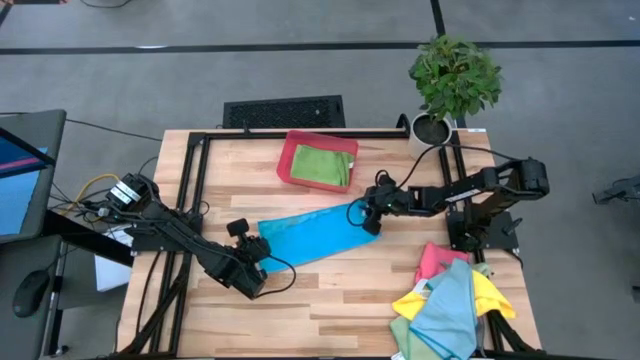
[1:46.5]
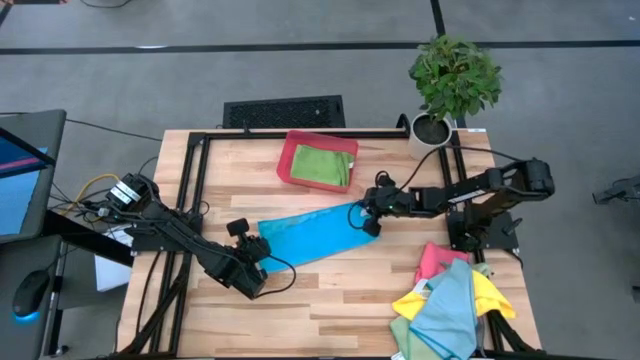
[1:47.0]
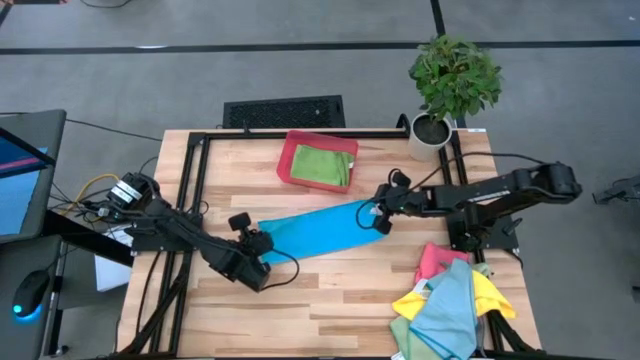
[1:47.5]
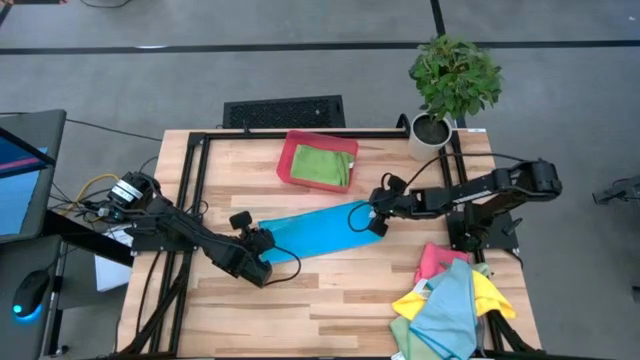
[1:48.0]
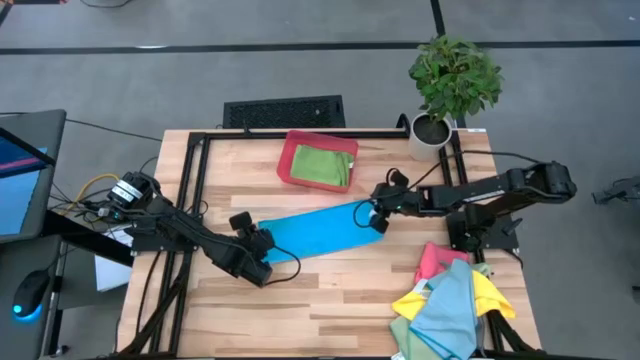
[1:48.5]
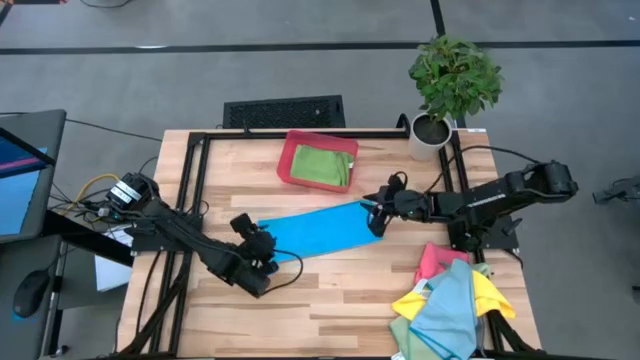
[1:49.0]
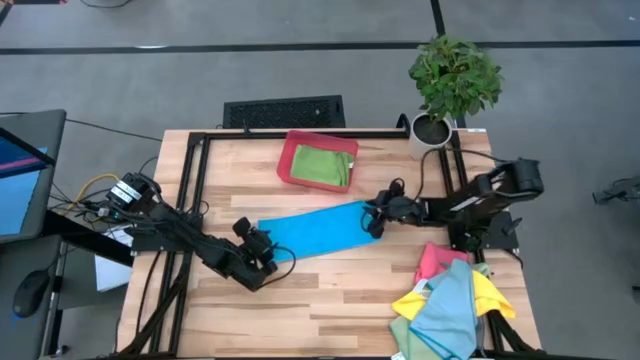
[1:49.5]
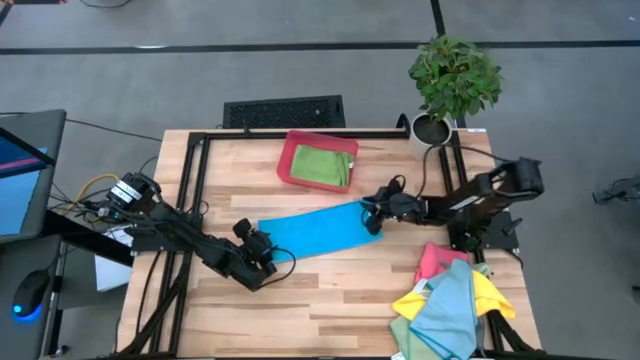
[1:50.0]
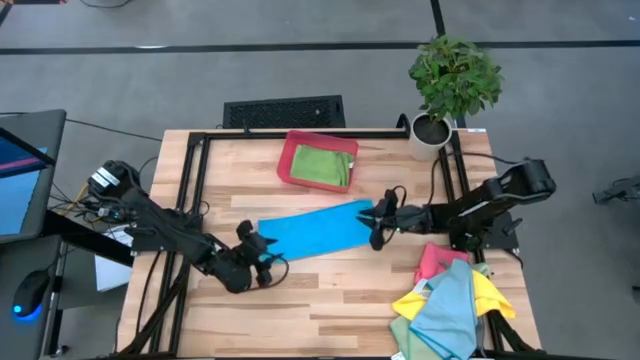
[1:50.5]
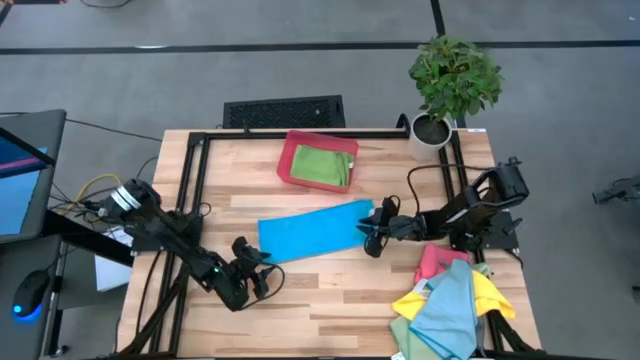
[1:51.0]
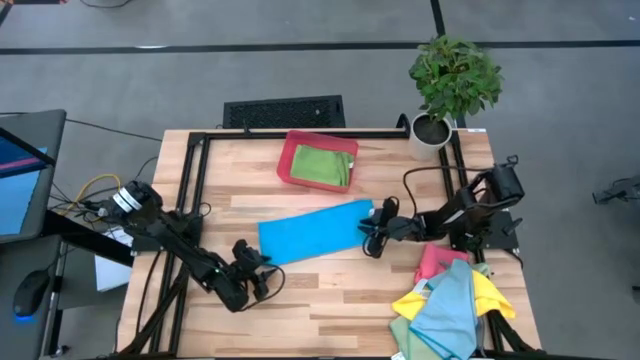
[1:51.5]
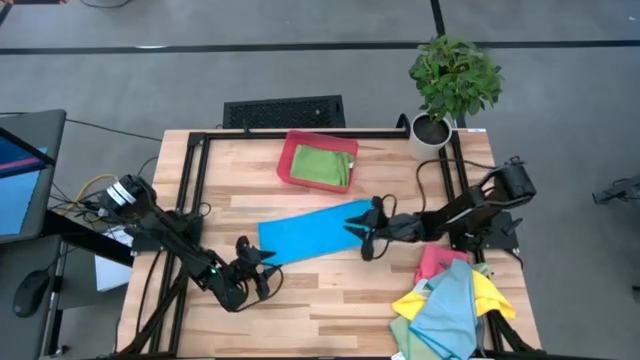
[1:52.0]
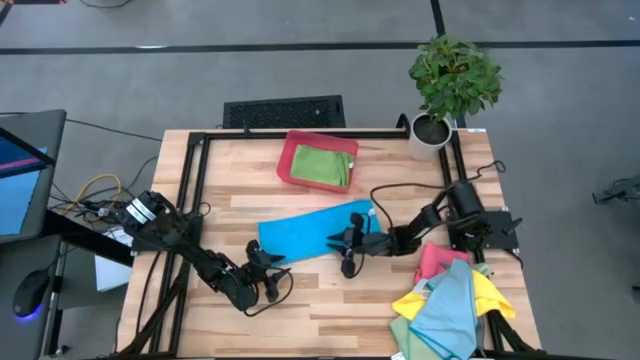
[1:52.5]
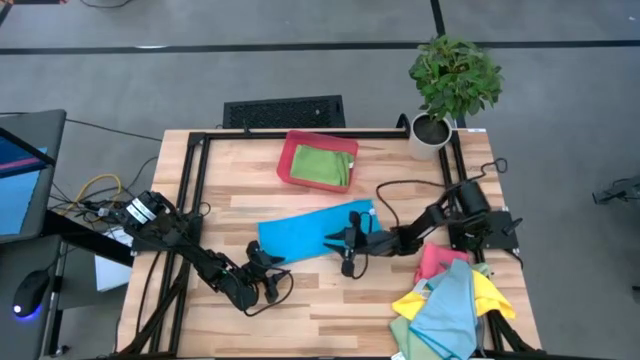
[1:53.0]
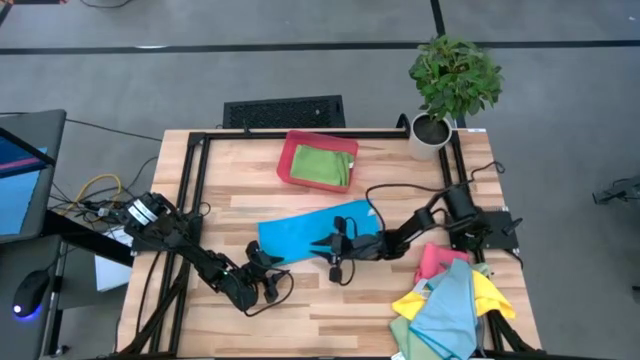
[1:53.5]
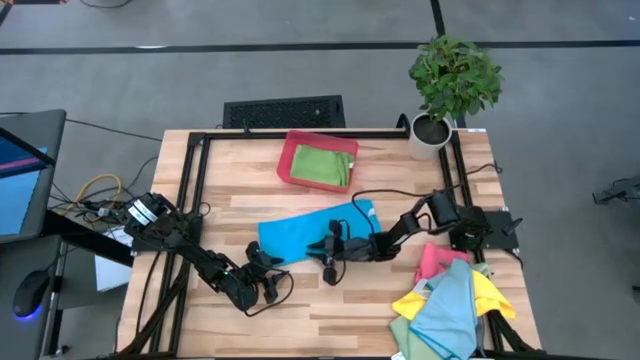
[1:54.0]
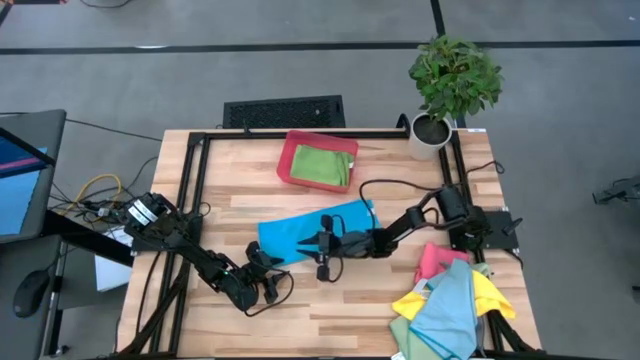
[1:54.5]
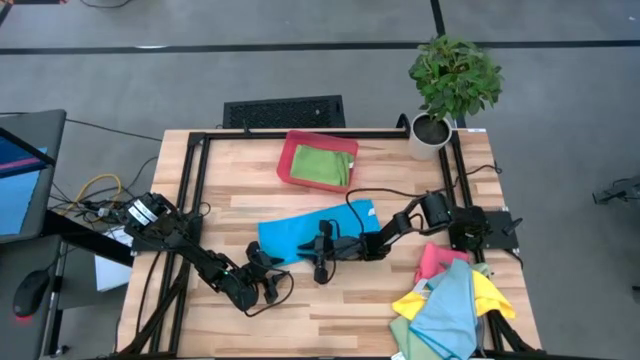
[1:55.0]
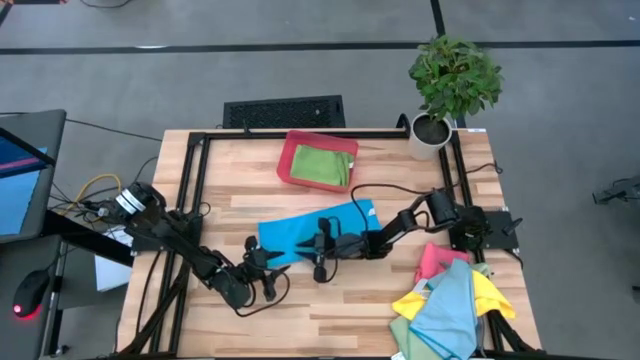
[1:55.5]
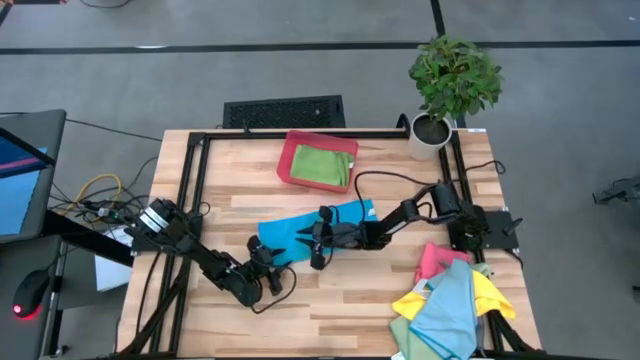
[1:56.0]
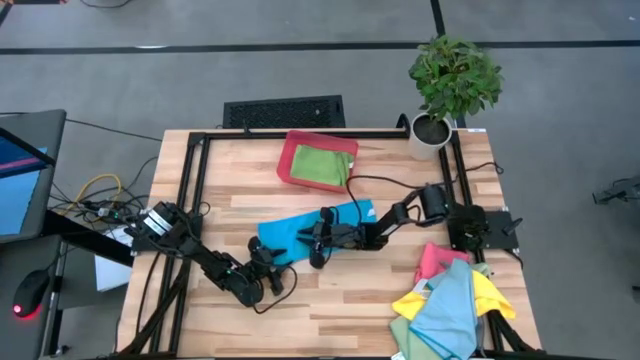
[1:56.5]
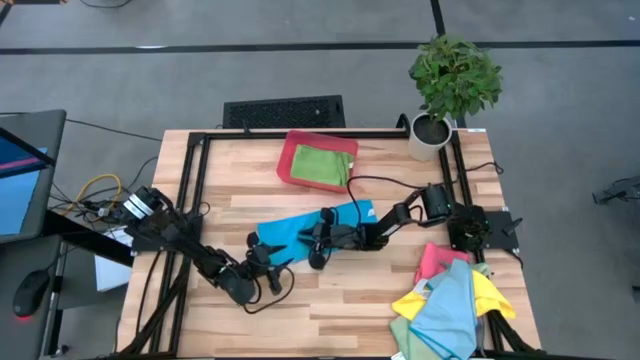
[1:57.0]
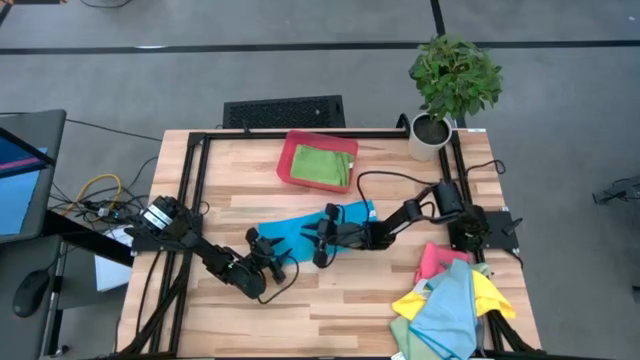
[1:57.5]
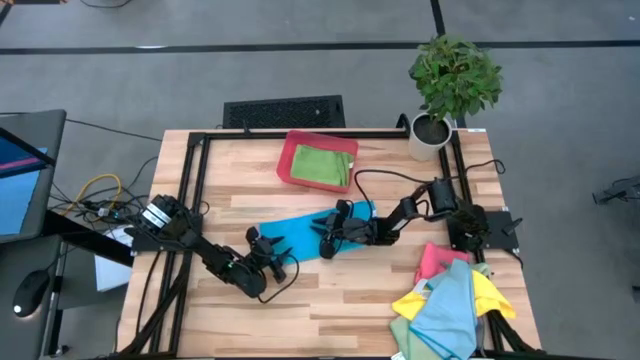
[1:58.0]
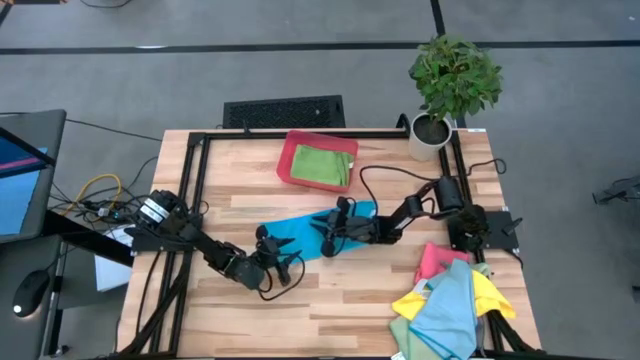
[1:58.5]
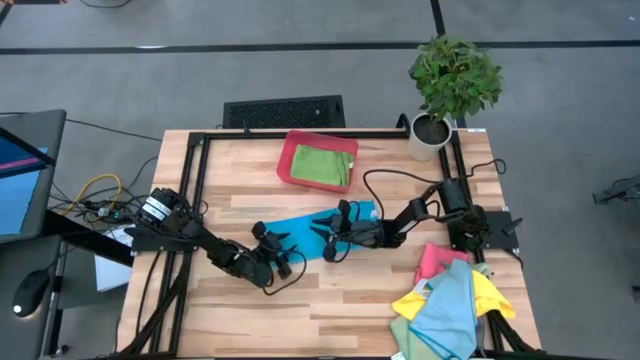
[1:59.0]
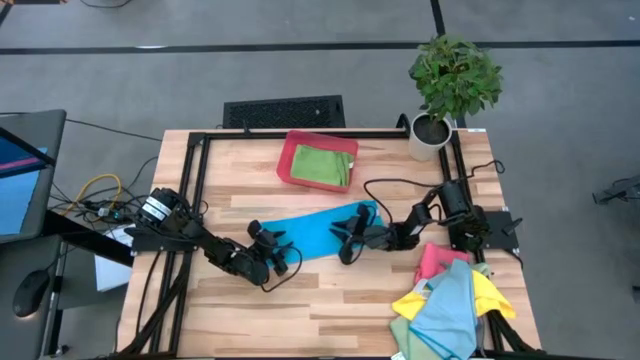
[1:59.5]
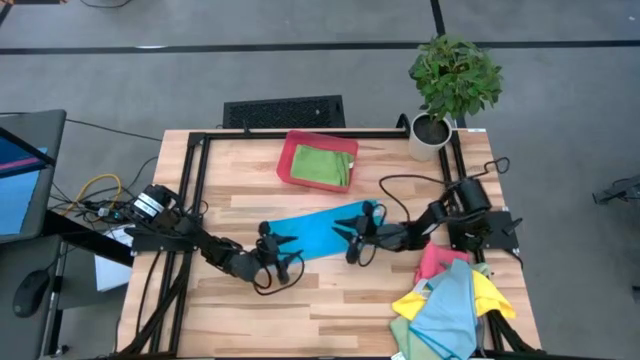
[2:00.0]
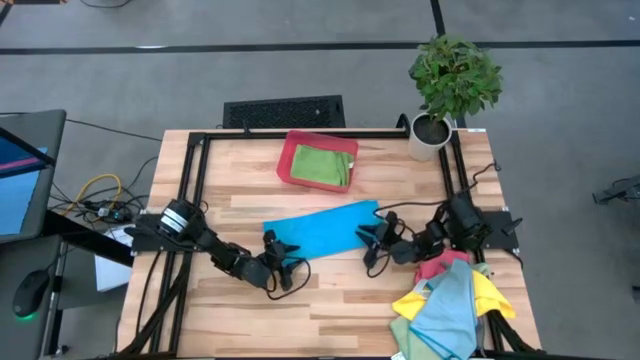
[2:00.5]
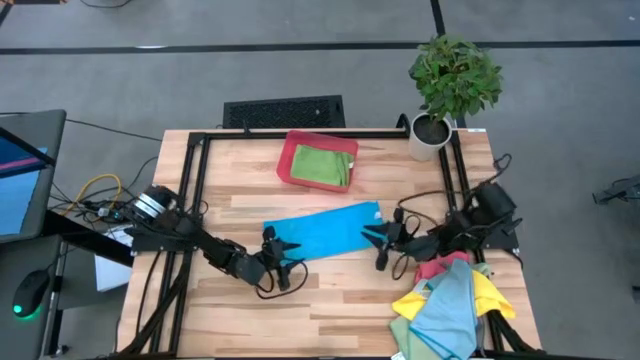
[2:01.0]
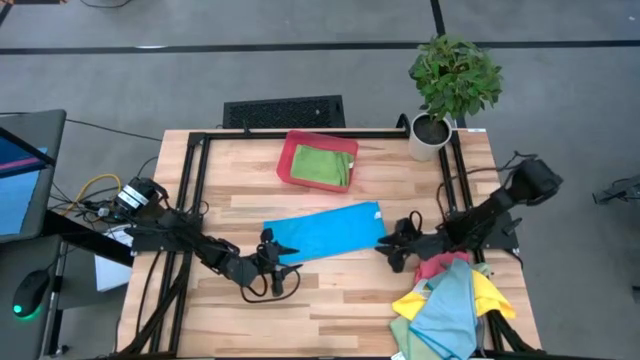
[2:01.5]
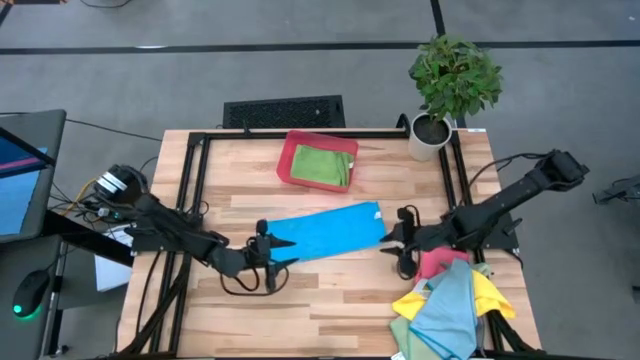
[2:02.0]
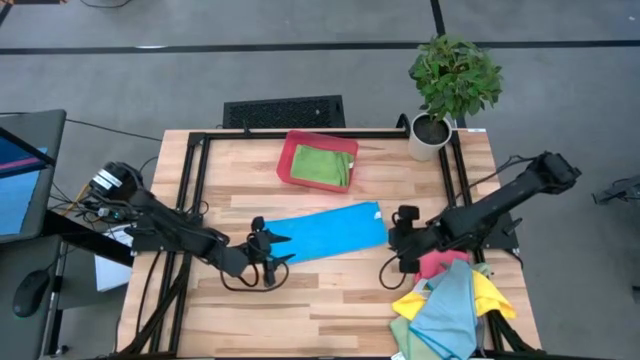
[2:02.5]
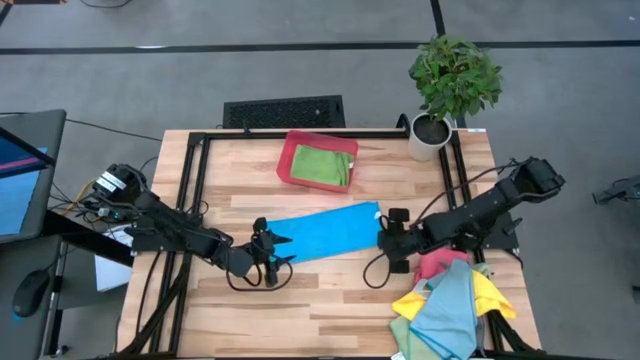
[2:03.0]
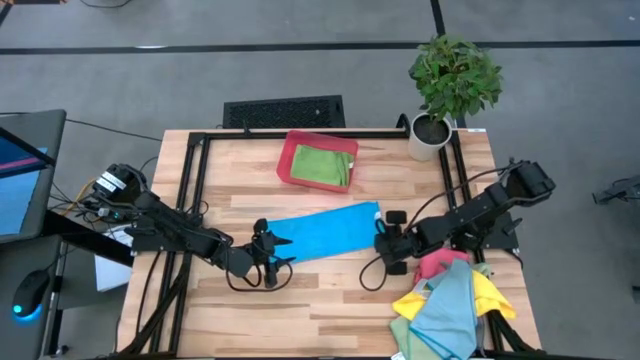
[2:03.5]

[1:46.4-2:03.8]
Task: Fold microfiber towels
Fold the blue microfiber cloth

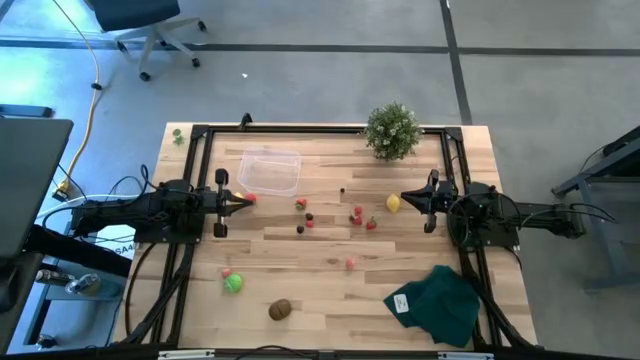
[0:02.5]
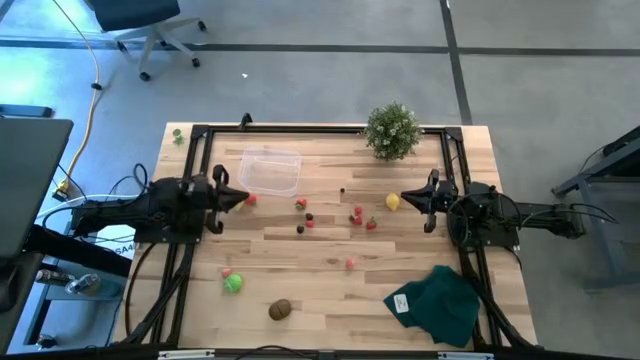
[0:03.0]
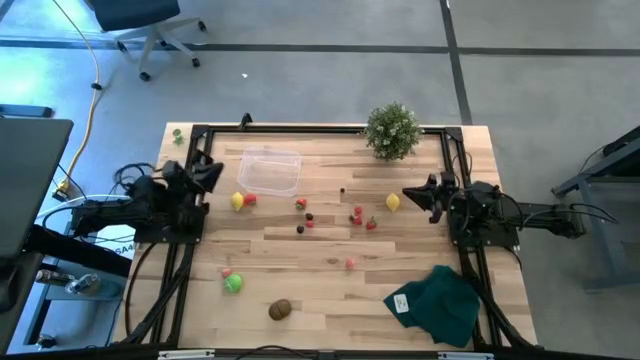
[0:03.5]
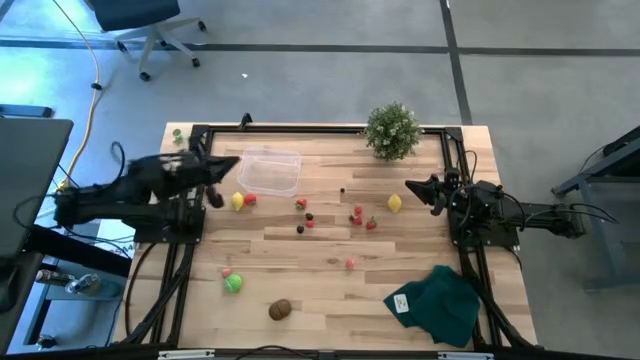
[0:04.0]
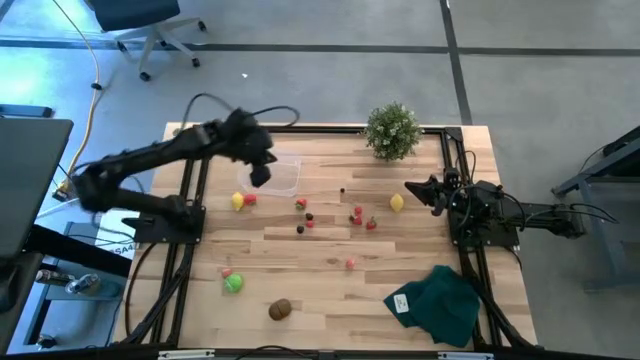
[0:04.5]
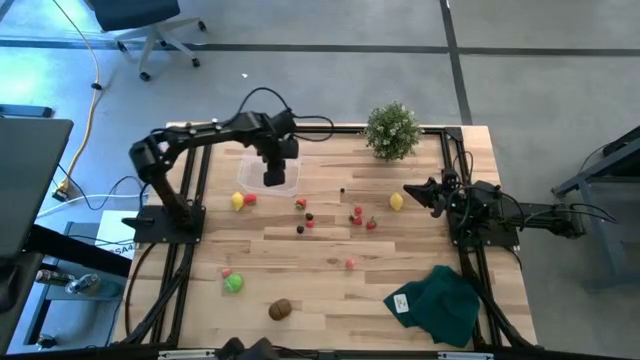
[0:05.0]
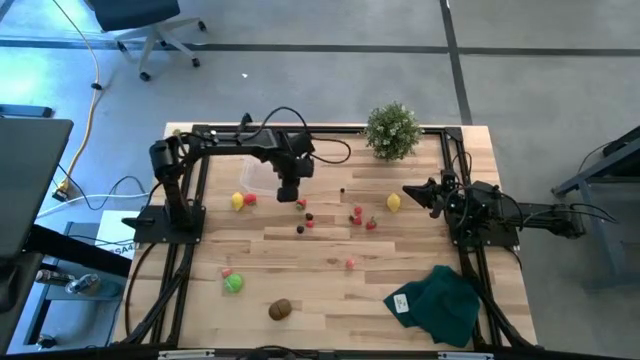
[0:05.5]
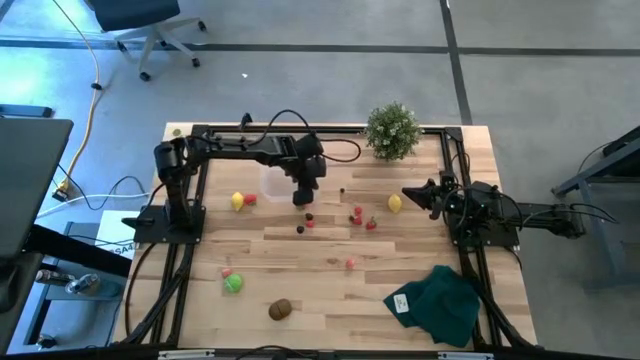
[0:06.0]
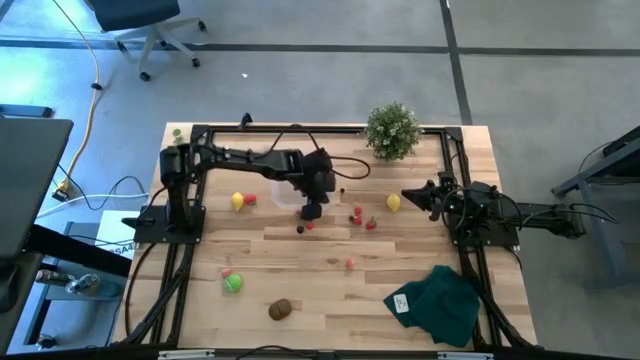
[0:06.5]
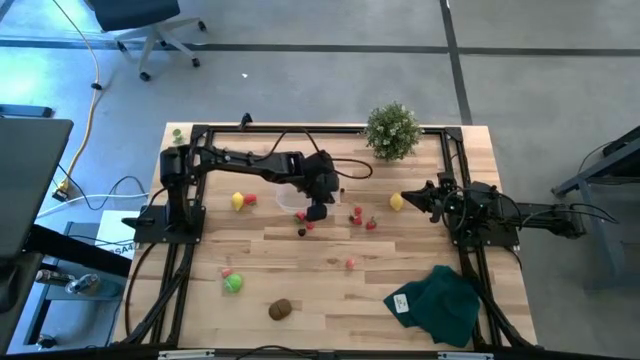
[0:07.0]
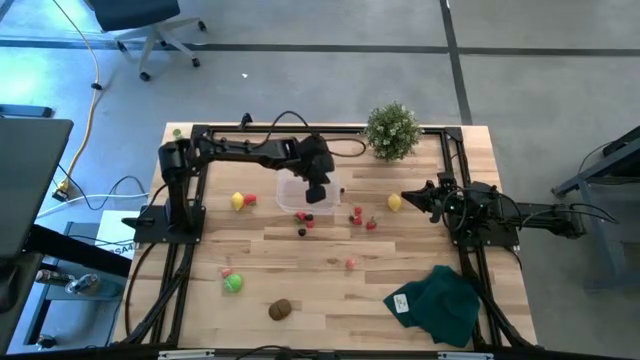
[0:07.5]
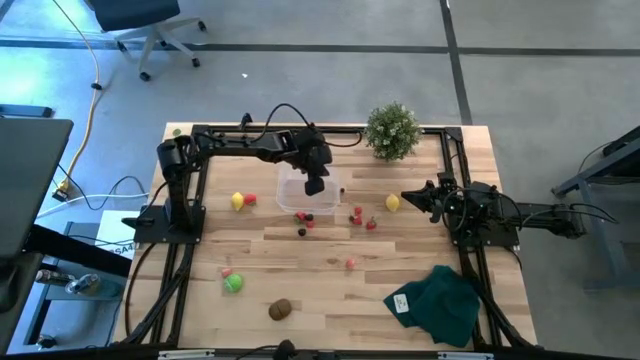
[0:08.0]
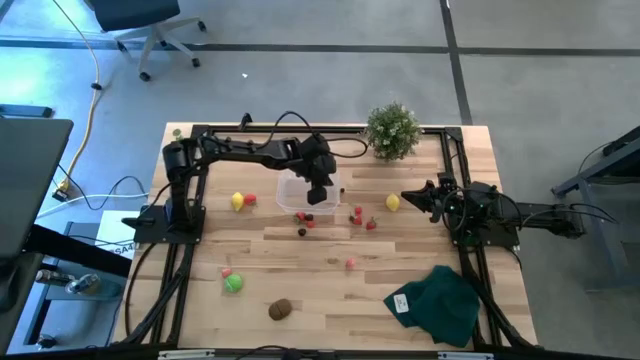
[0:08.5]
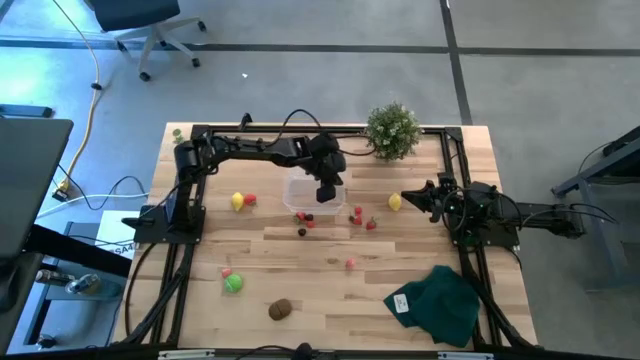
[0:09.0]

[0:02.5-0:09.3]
Task: Pick and placing Produce into tupperware
Prepare the transparent bin
